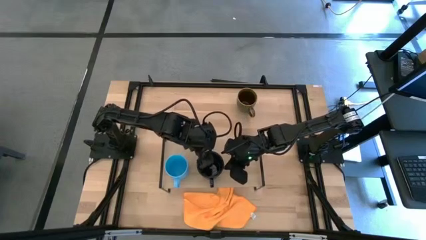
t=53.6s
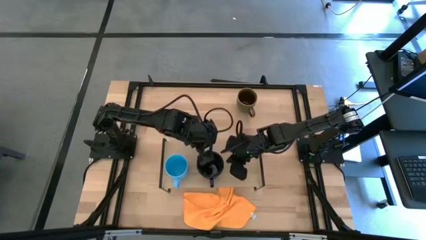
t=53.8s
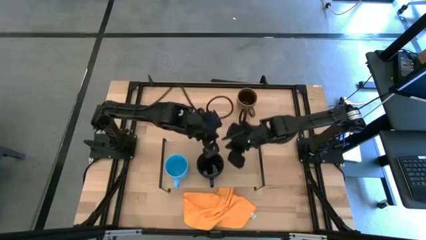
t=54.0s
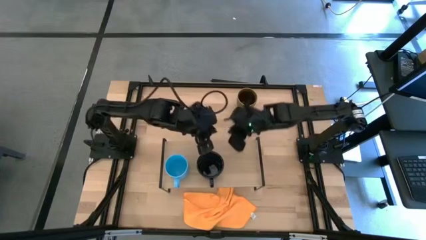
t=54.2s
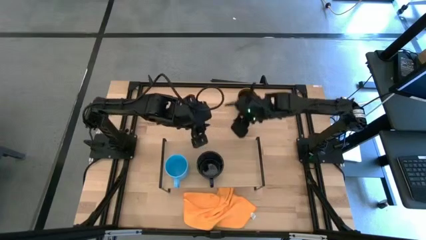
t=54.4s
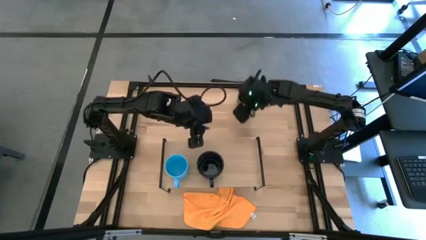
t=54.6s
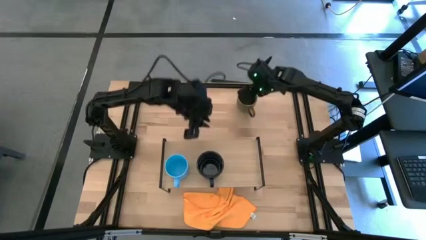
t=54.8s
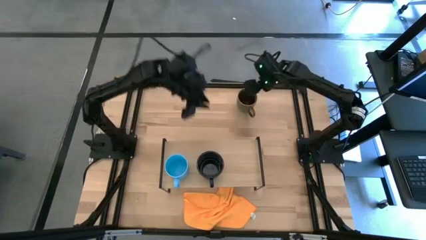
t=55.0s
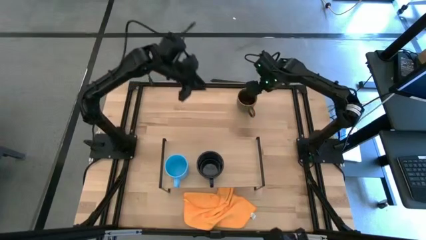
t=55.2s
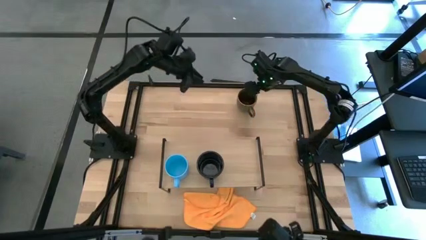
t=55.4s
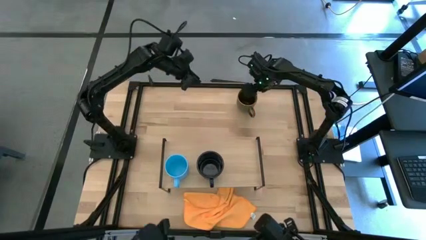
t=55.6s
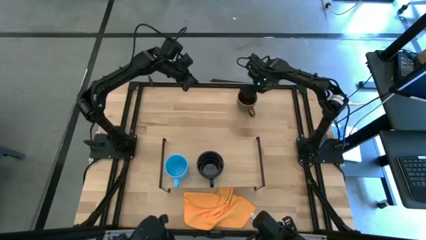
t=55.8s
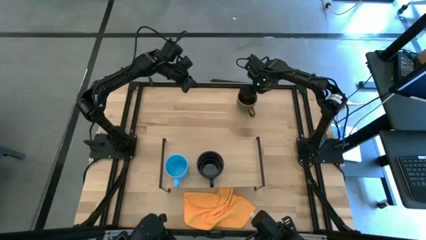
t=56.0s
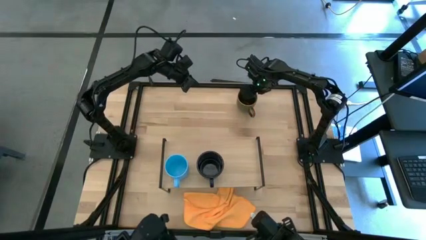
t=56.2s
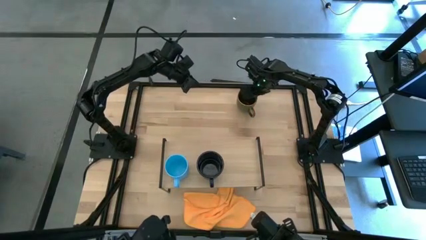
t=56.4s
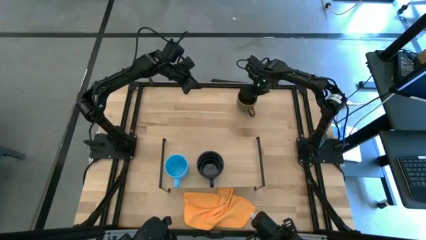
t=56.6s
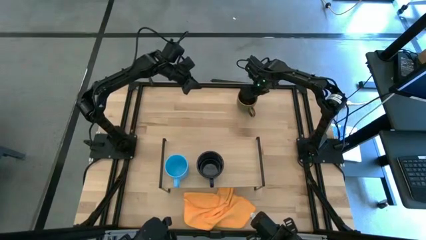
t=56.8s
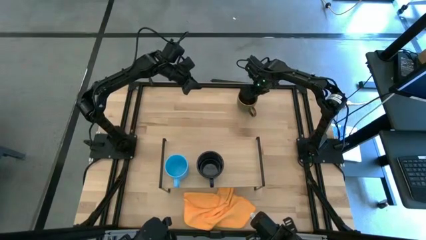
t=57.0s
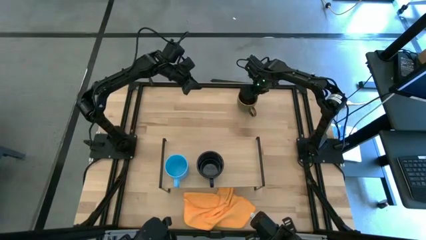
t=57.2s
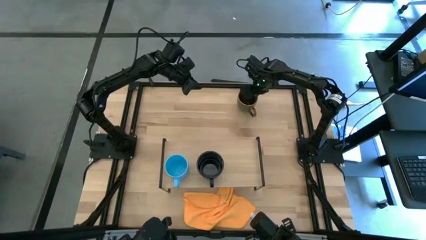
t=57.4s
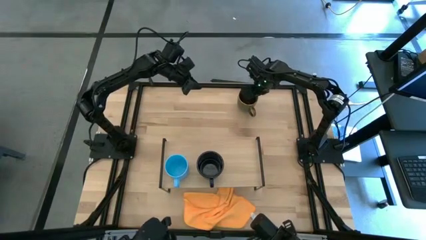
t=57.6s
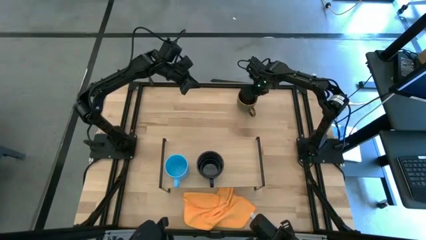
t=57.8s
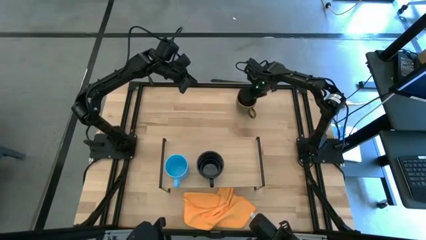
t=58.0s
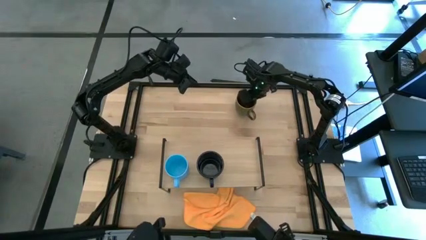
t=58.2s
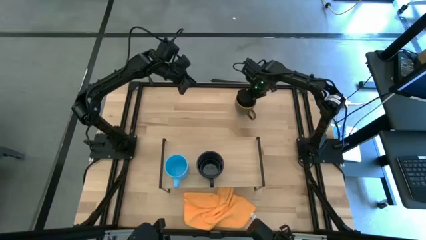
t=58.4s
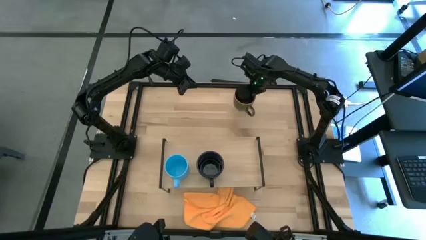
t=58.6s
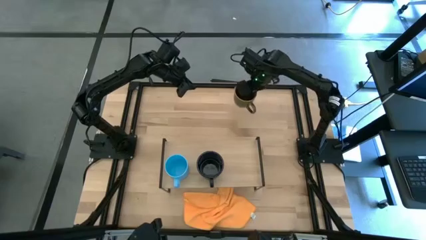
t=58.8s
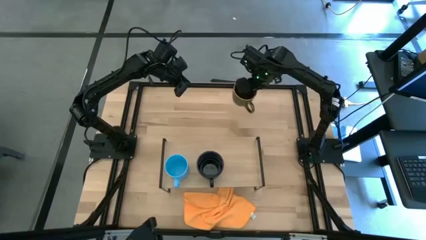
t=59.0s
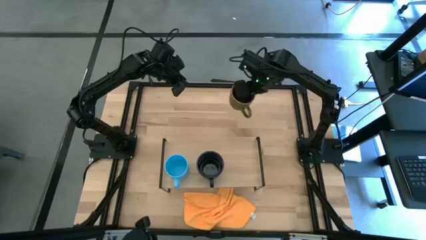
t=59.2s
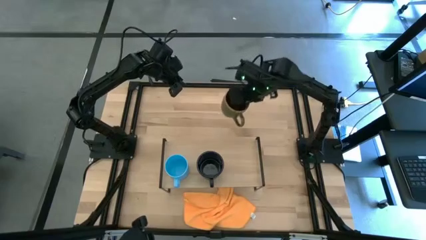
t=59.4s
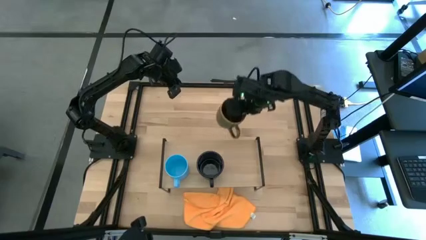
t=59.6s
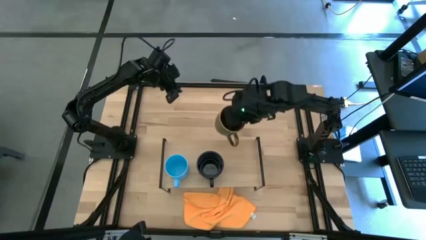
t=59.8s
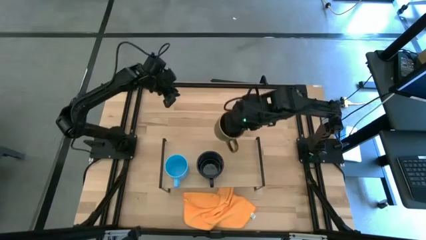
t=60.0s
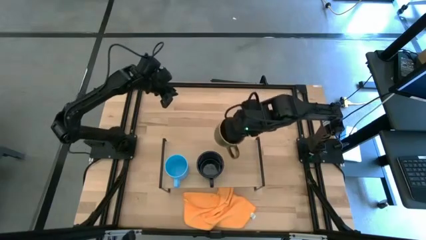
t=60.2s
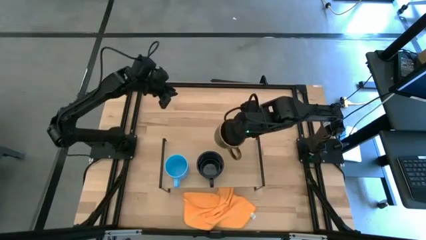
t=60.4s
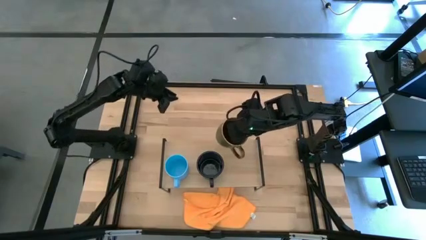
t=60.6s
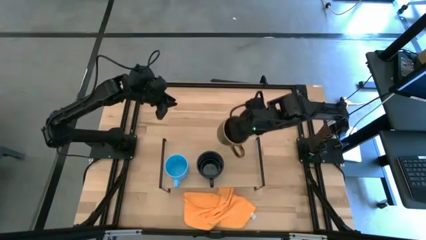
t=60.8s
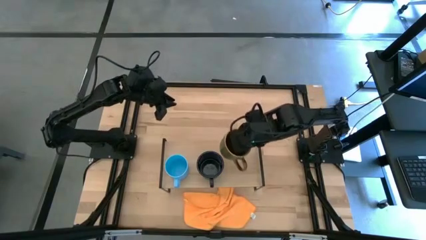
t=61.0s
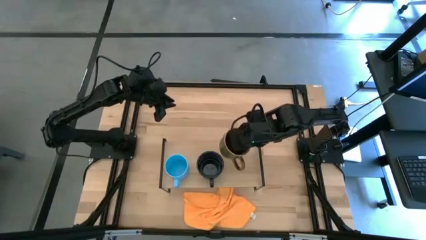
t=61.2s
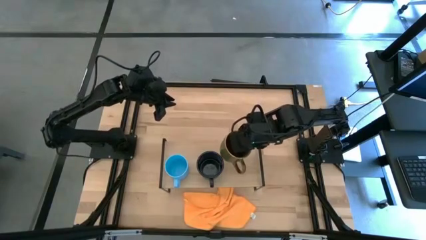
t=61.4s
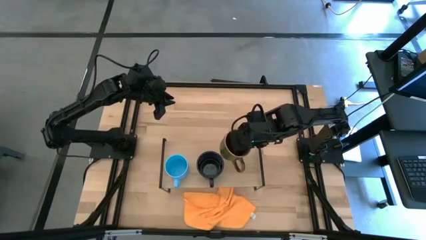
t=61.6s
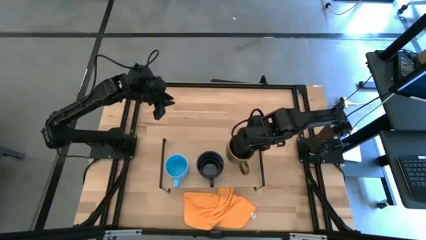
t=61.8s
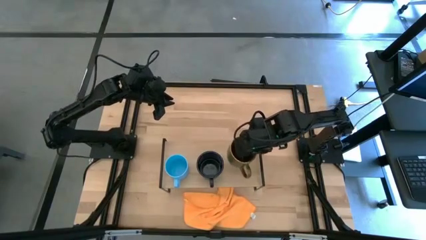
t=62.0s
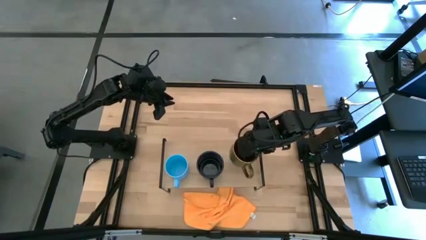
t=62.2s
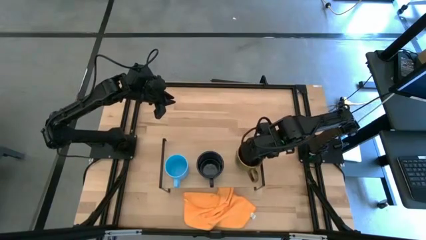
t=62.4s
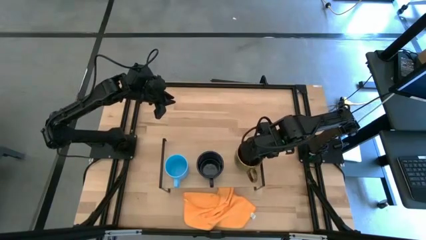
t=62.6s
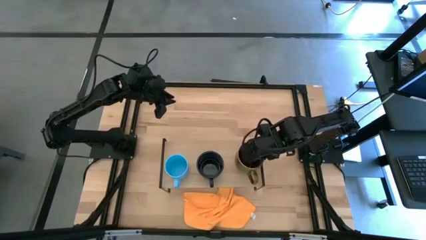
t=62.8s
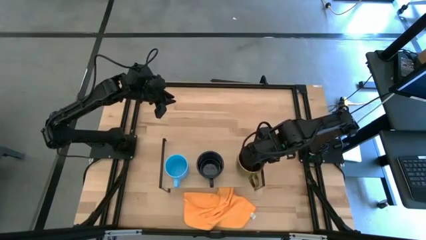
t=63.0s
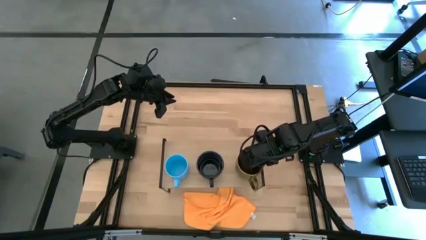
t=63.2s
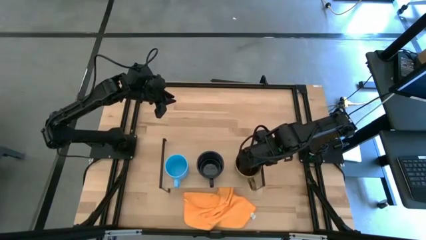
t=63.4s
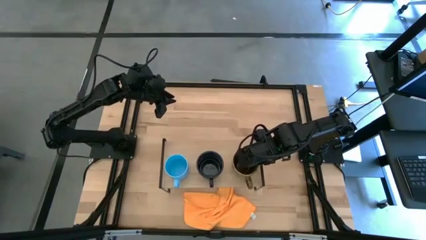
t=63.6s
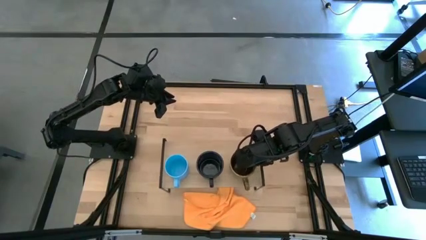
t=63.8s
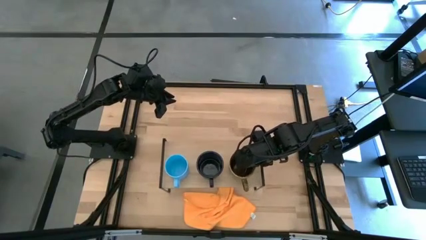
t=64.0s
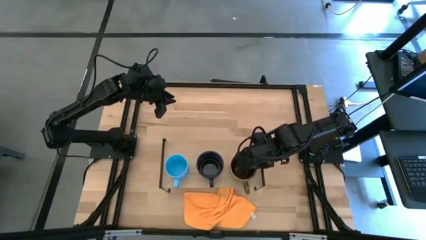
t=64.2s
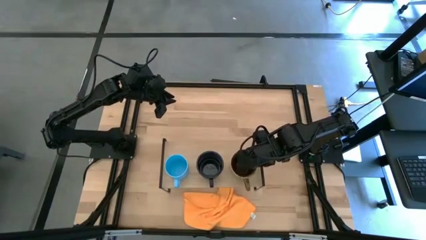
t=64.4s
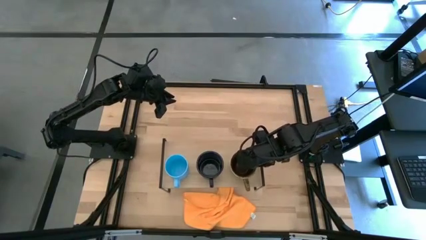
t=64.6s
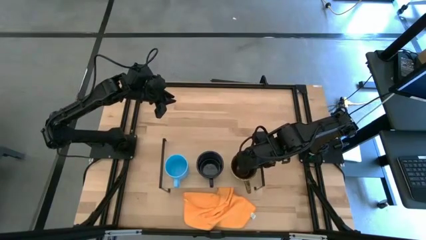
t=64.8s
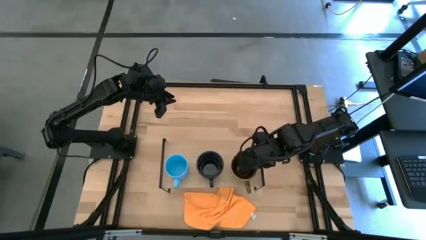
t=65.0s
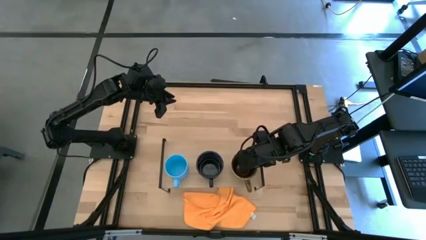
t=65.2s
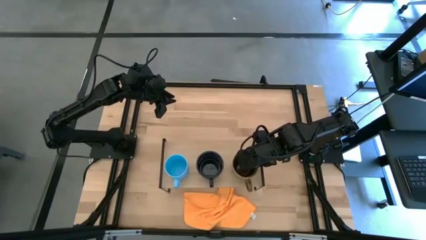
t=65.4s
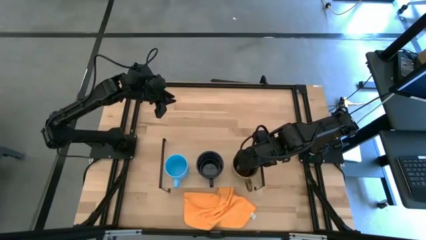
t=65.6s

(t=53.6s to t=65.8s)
Task: Stack small to large cups/mugs on shelf
Put the brown mug on the shelf

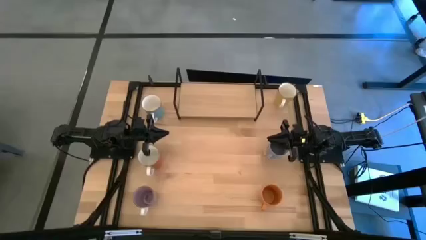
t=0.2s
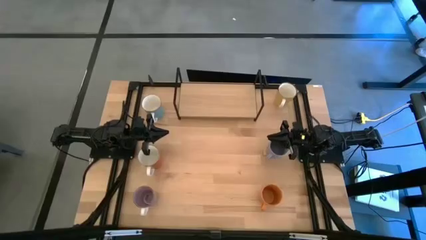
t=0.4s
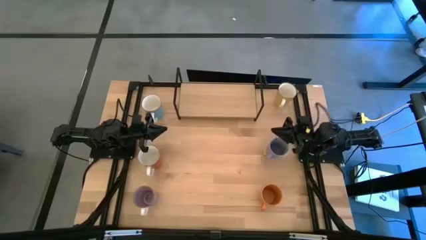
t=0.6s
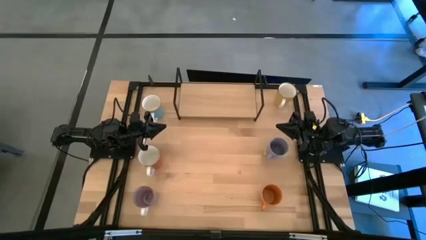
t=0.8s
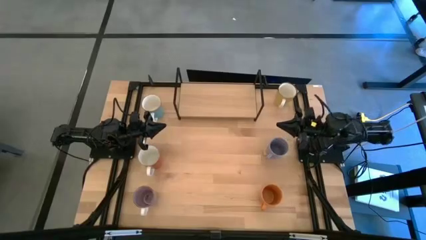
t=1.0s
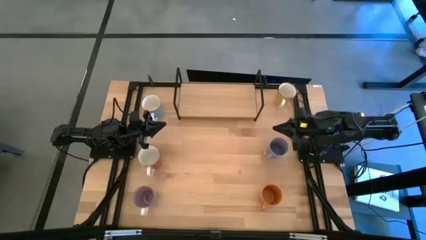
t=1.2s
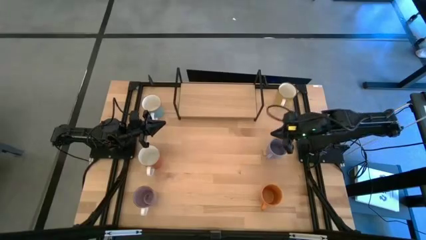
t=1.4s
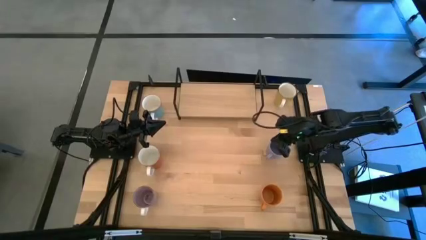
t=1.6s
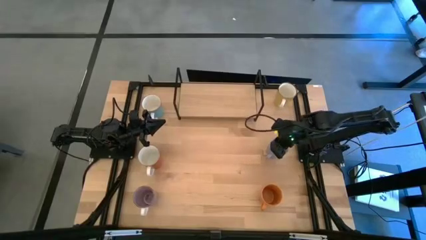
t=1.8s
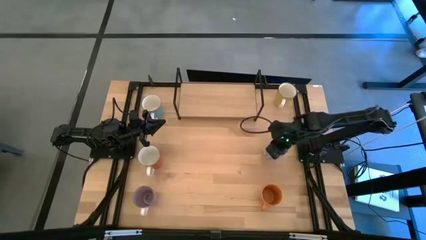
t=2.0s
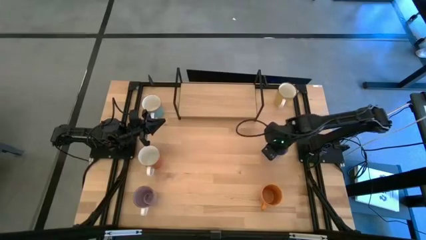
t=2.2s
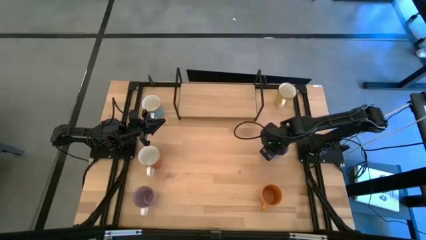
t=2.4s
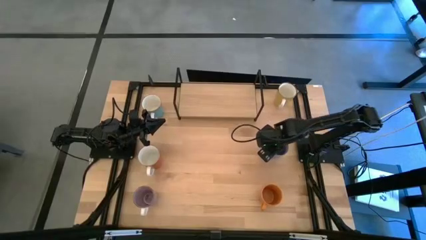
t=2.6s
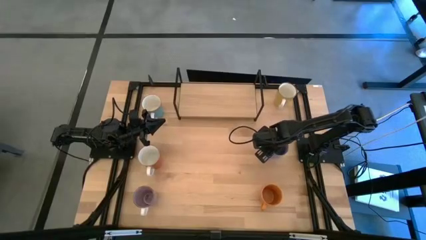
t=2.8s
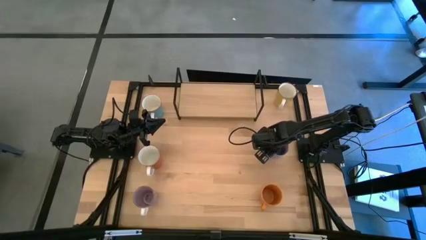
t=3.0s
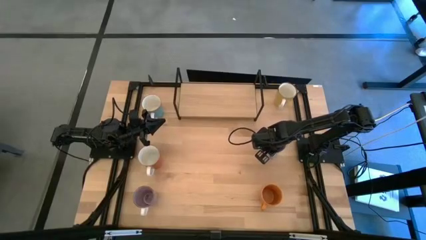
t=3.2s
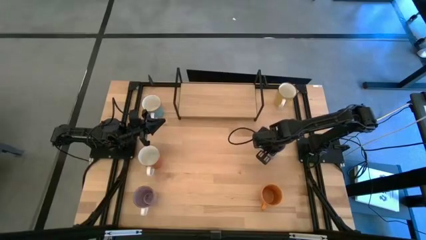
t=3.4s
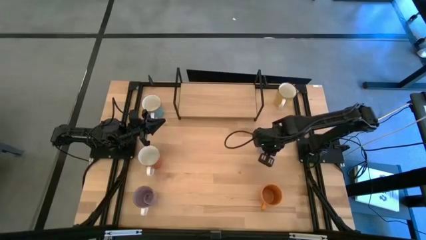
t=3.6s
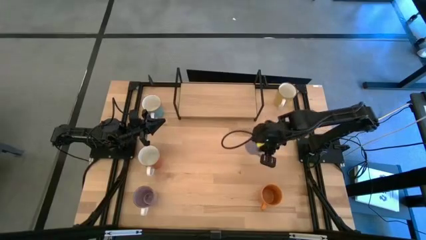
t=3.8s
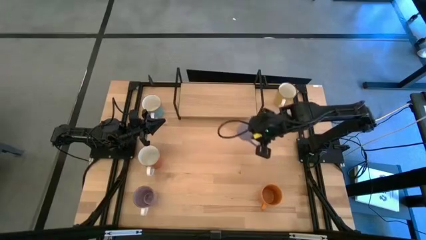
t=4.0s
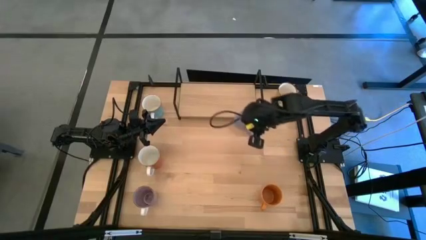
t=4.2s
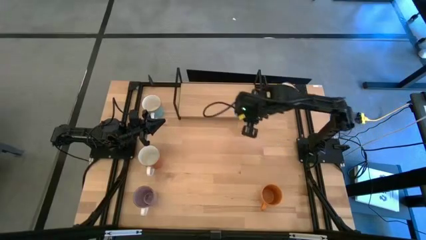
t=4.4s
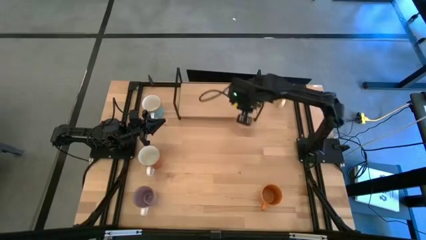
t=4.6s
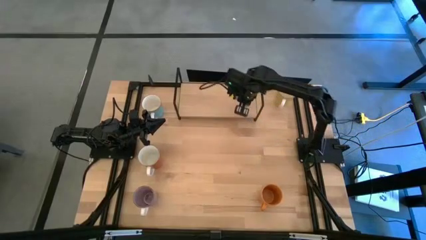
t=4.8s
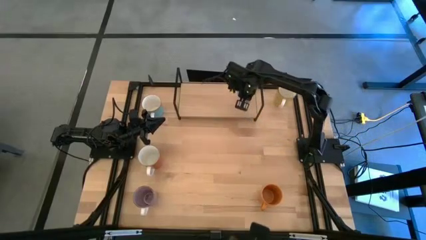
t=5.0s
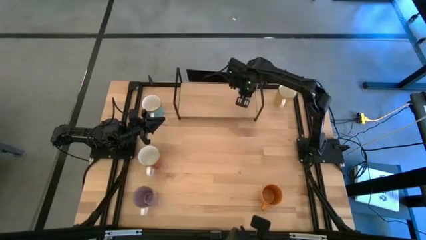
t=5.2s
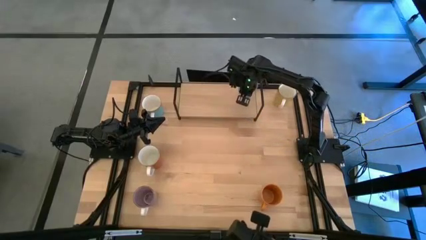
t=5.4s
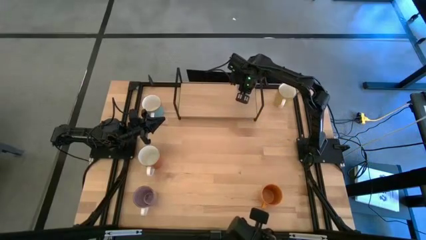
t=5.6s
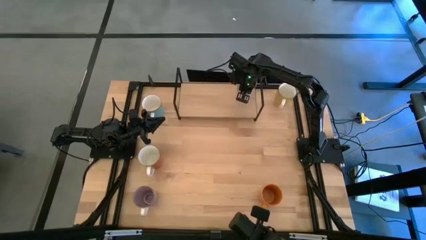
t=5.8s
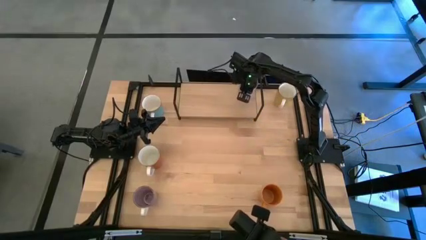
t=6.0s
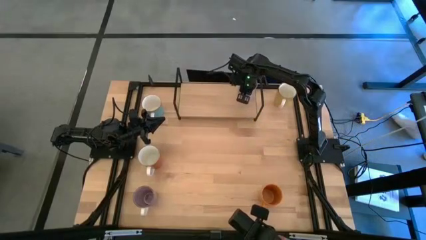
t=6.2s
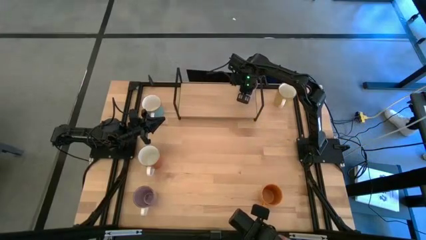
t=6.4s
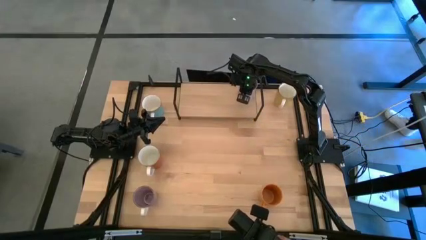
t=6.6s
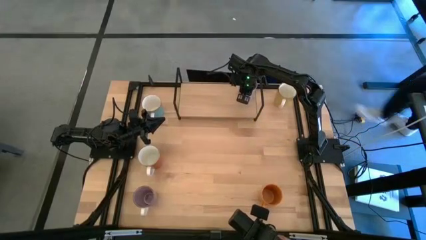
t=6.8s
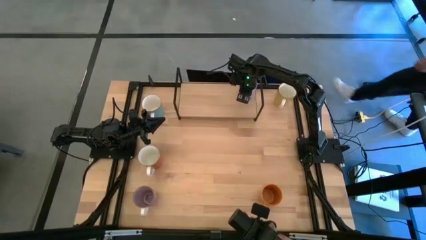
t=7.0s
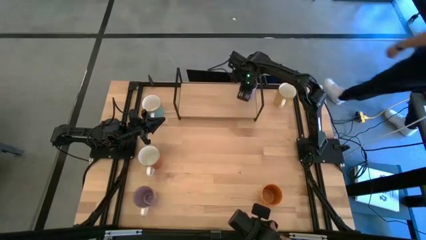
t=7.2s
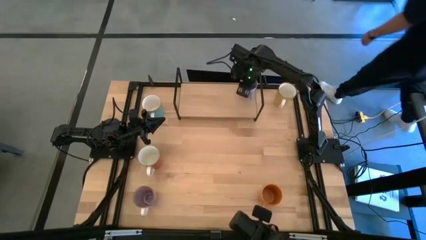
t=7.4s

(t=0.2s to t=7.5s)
Task: Place coffee mugs
Put the blue mug on the shelf
